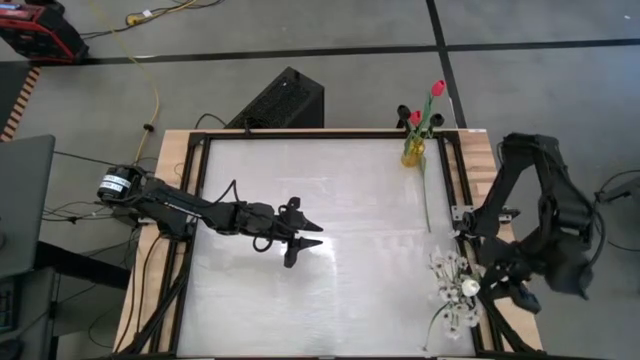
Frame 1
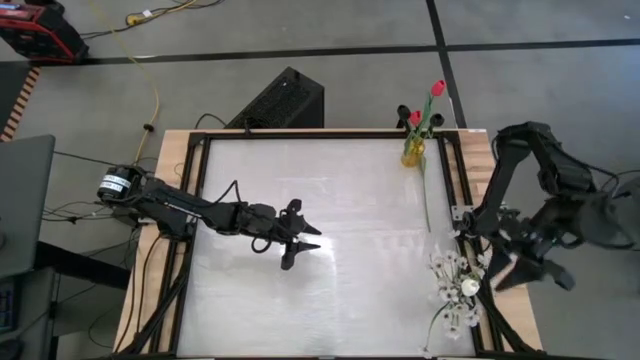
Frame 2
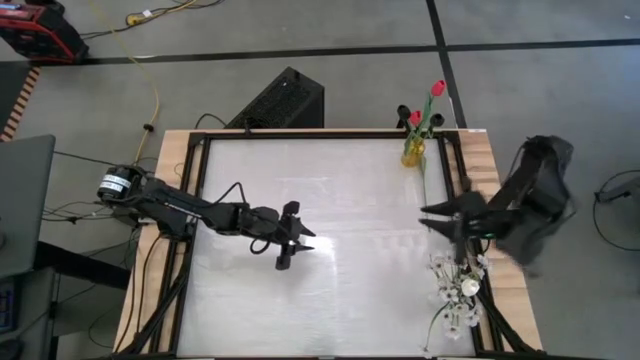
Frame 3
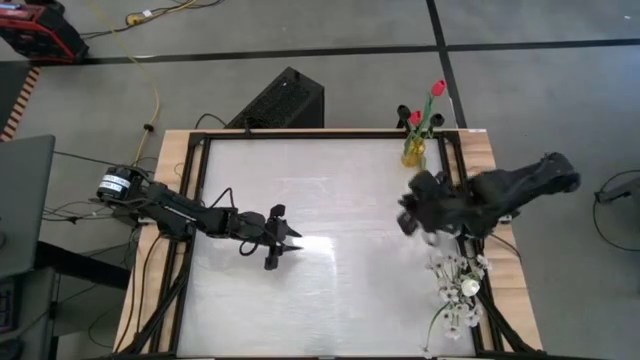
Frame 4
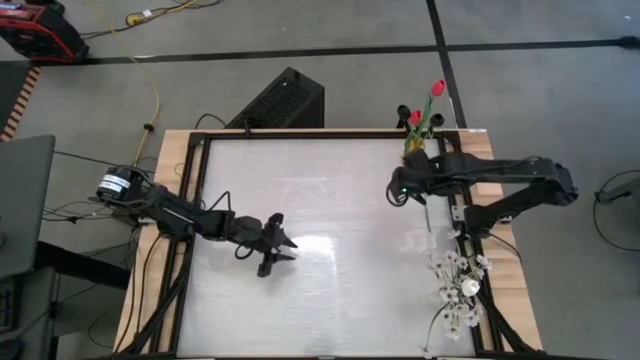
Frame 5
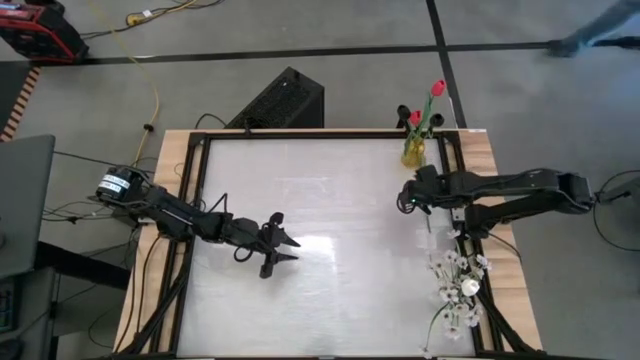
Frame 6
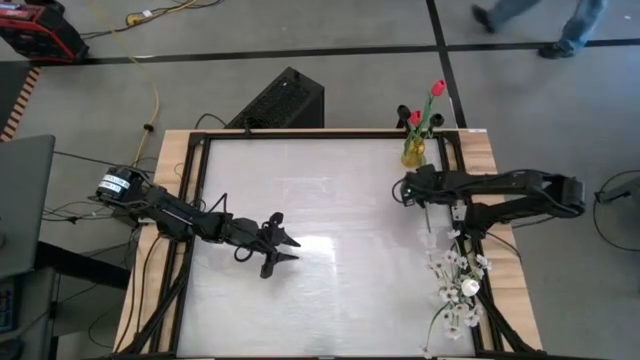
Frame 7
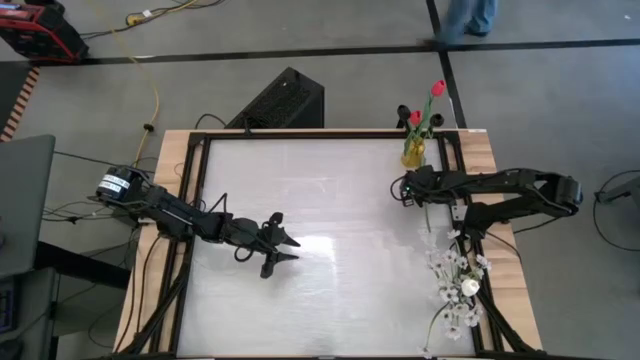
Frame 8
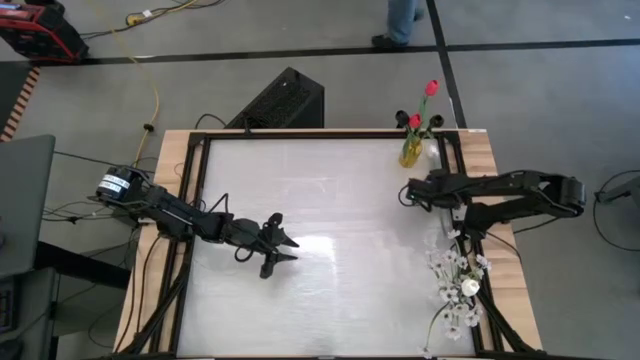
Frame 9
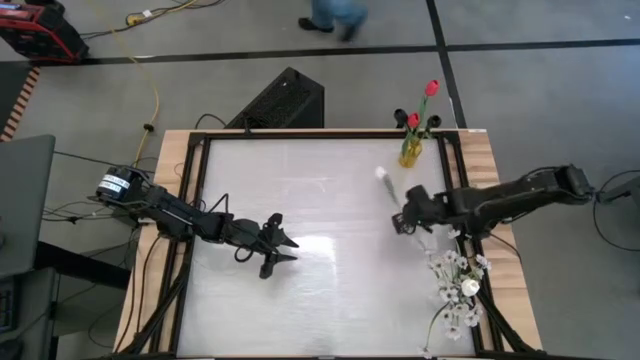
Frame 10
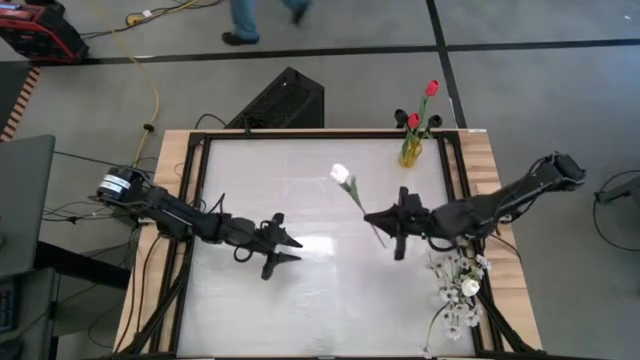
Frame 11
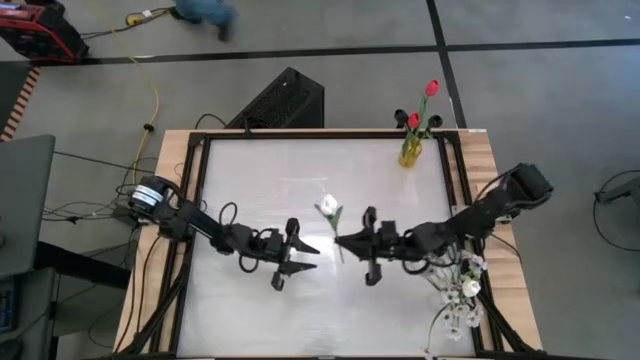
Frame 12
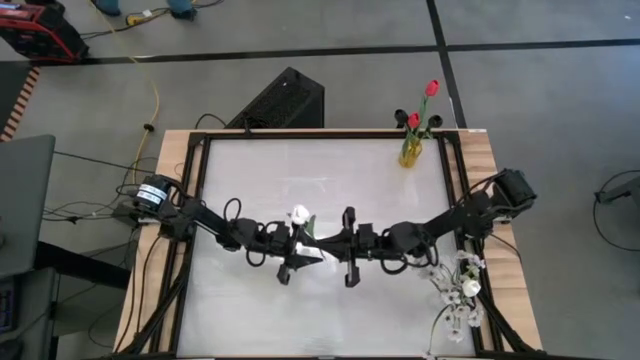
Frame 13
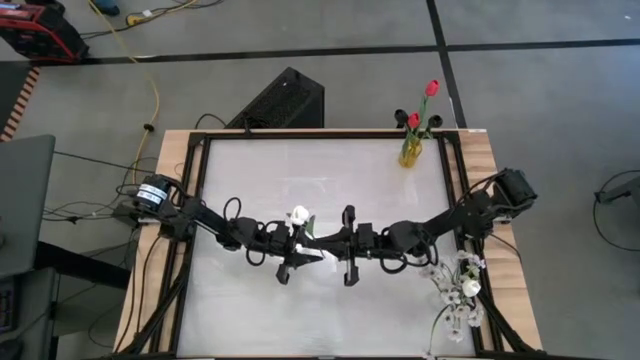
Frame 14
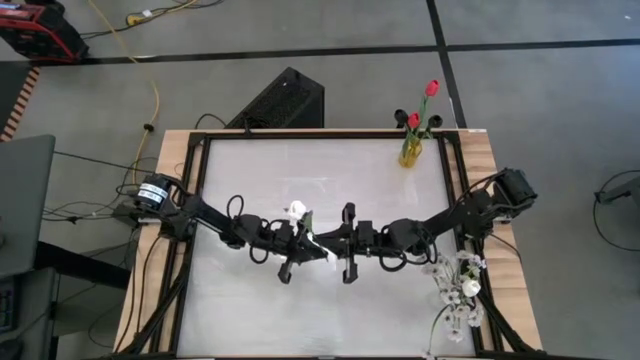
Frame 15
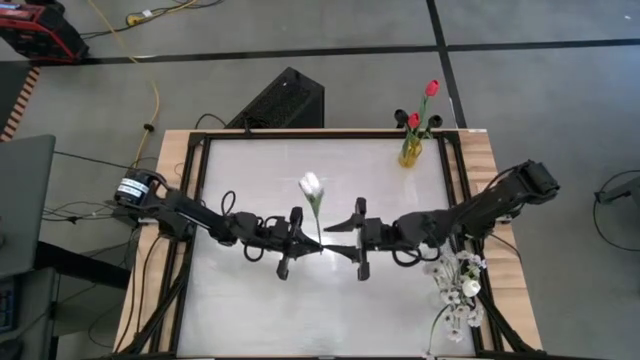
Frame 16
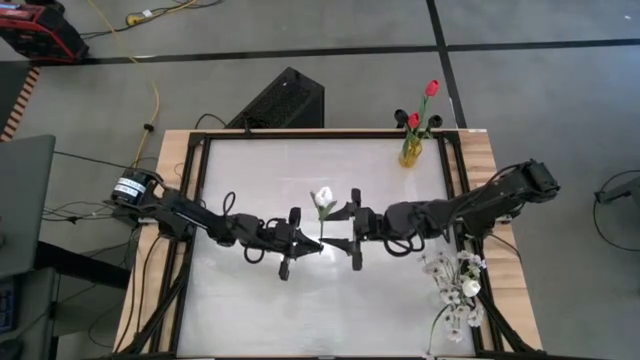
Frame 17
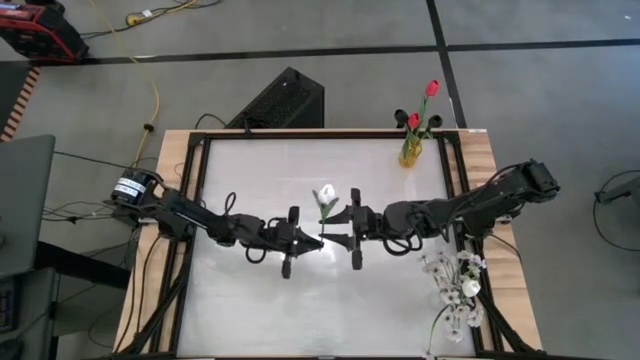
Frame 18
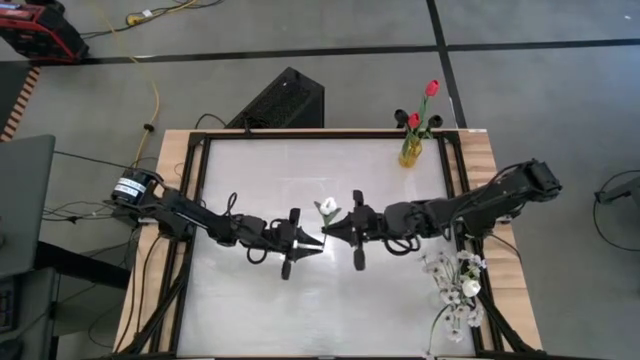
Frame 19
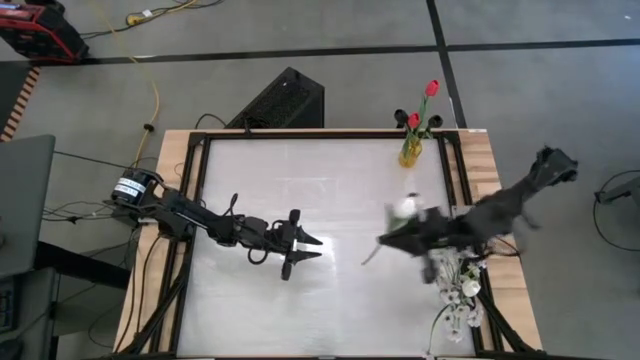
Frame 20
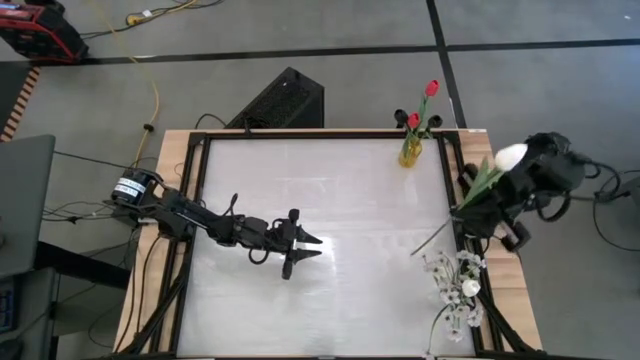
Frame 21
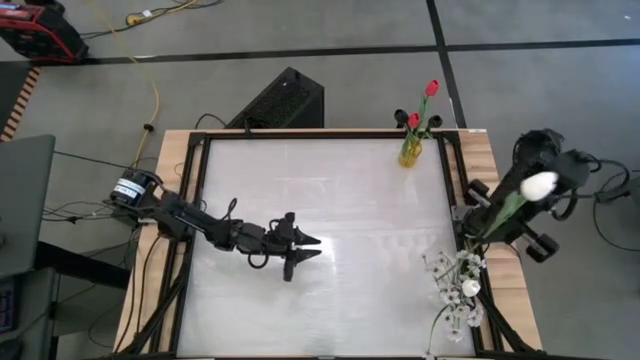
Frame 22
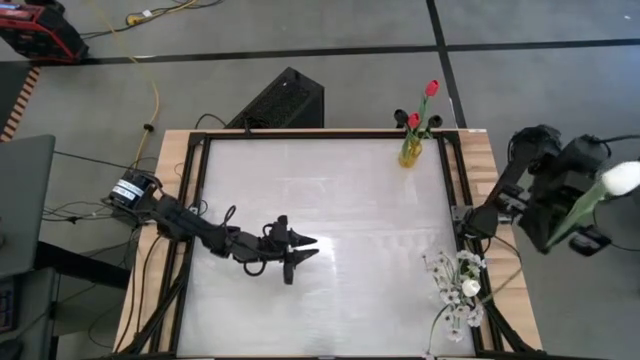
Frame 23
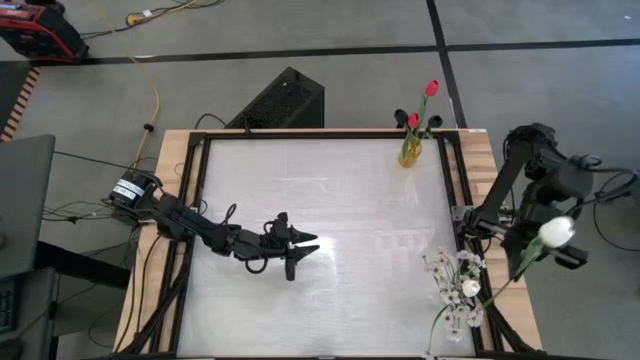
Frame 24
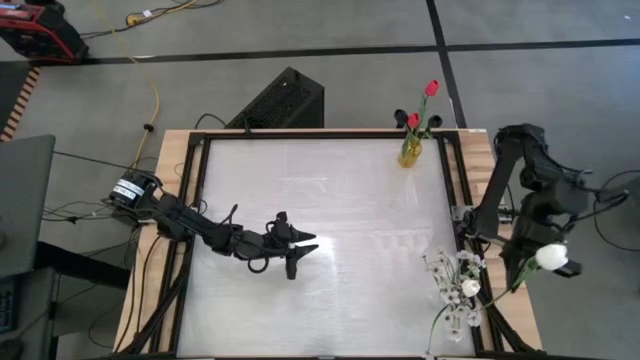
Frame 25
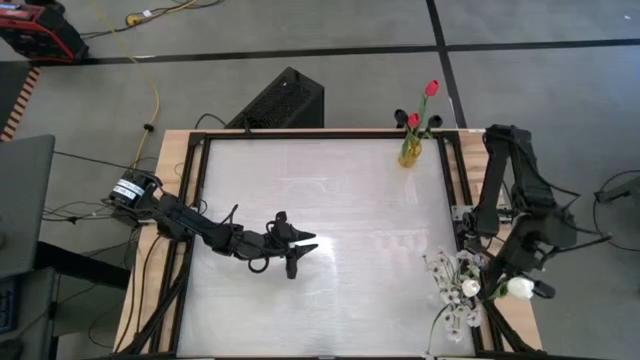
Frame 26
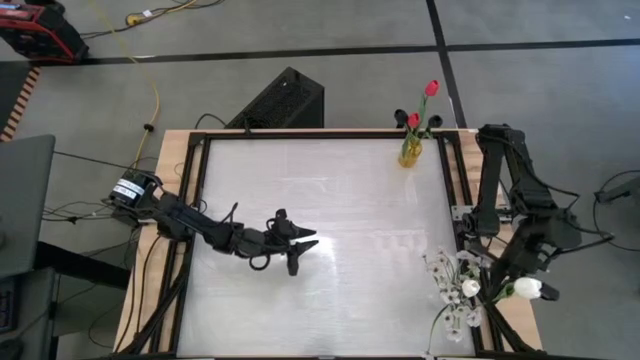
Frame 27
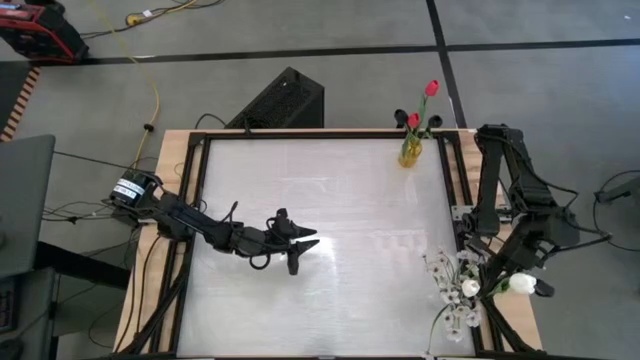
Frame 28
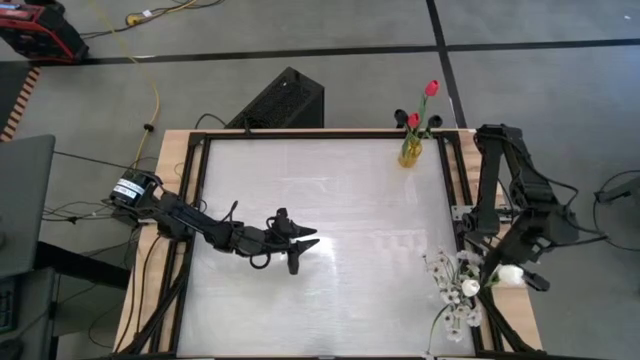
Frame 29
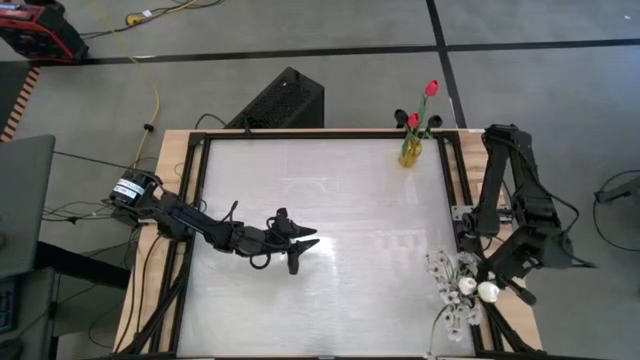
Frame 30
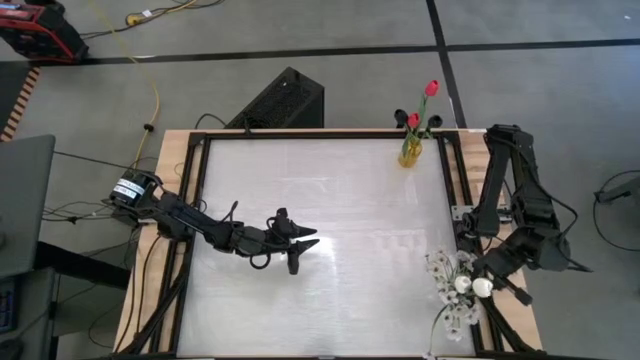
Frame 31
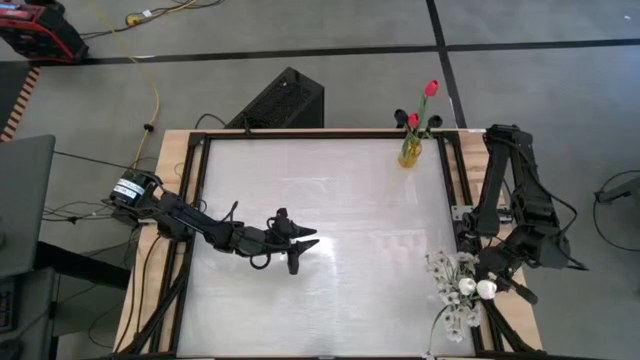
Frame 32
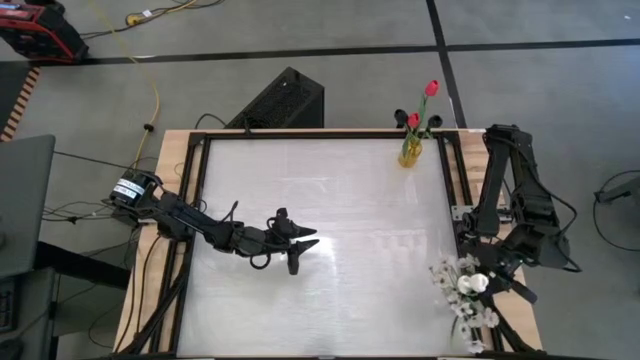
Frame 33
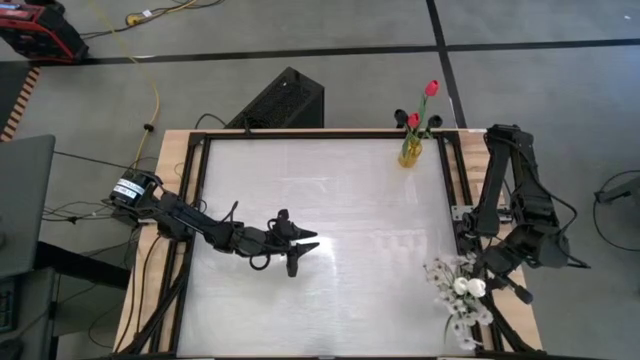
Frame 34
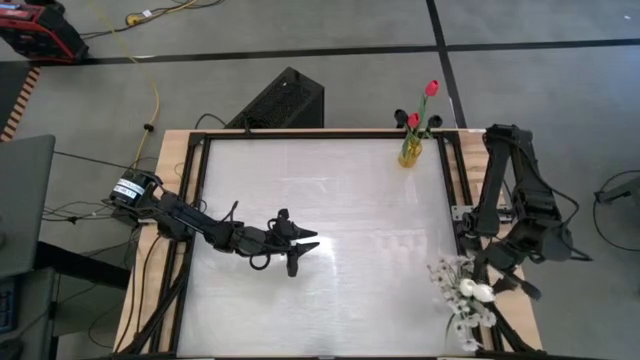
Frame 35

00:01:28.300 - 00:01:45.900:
Task: Sort flowers into vase by color
Put the white flower into the transparent flower vase

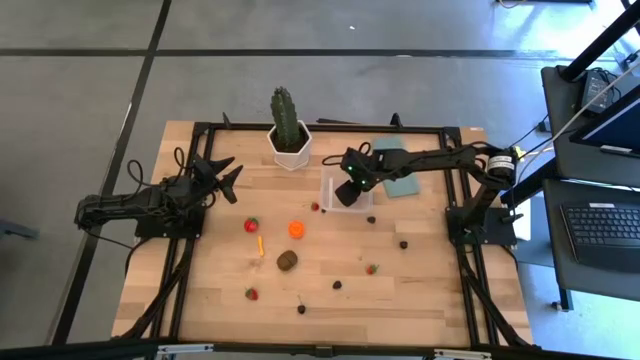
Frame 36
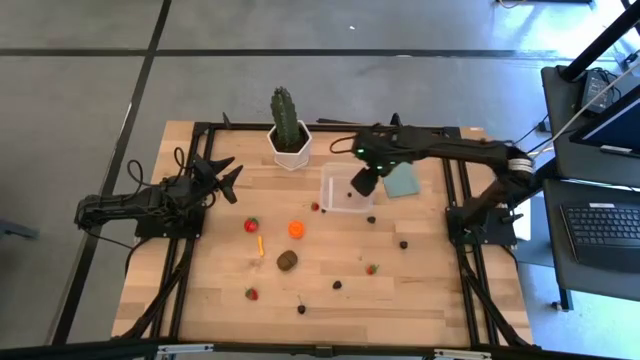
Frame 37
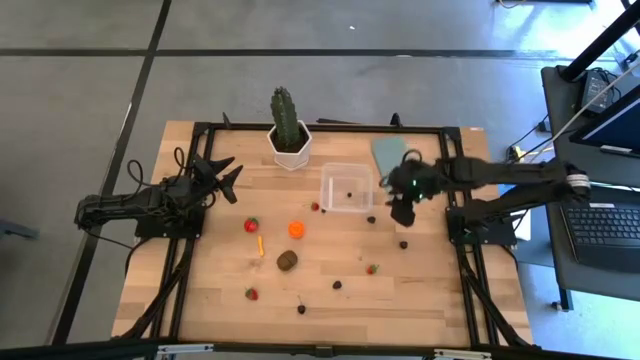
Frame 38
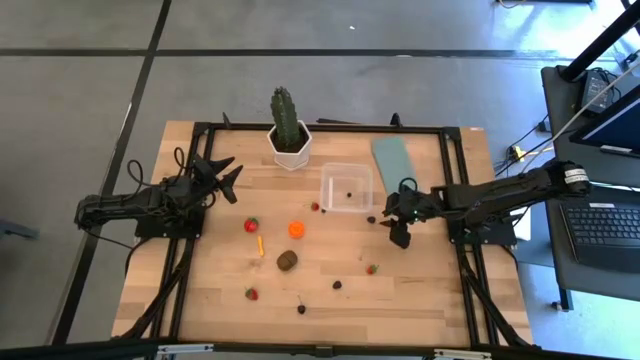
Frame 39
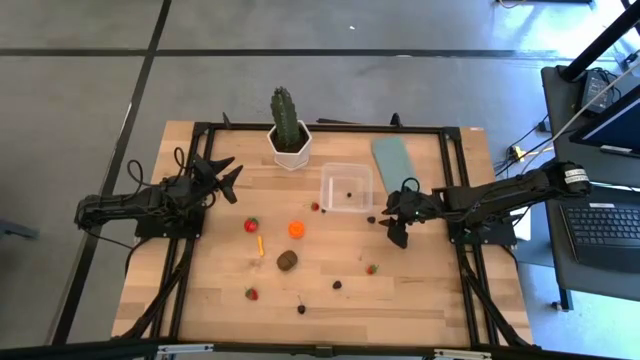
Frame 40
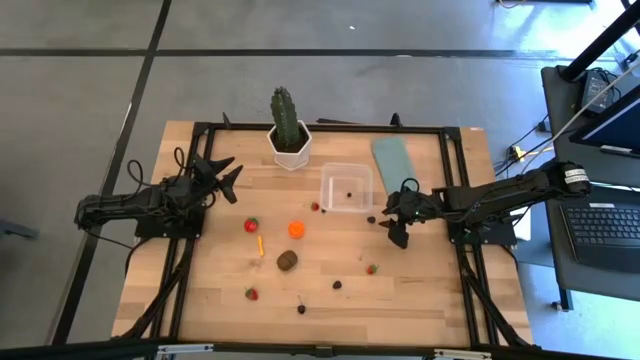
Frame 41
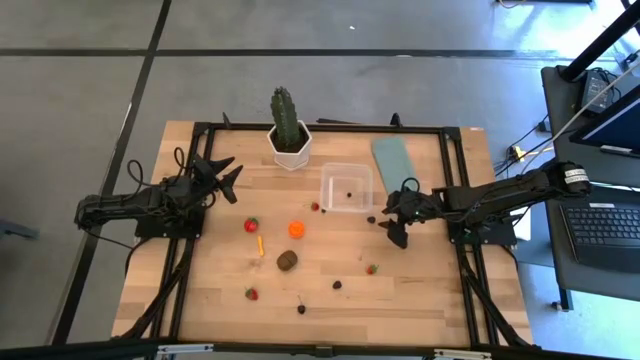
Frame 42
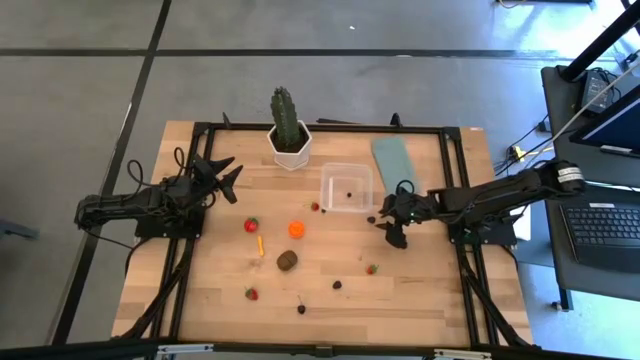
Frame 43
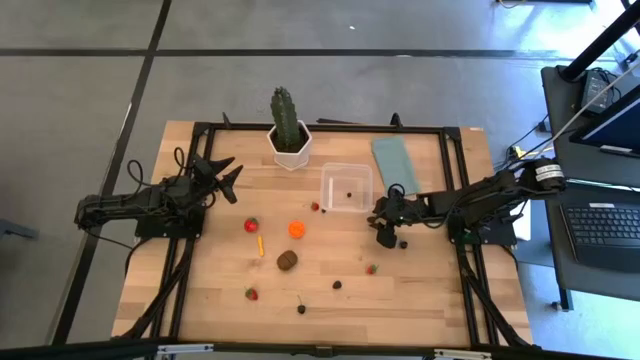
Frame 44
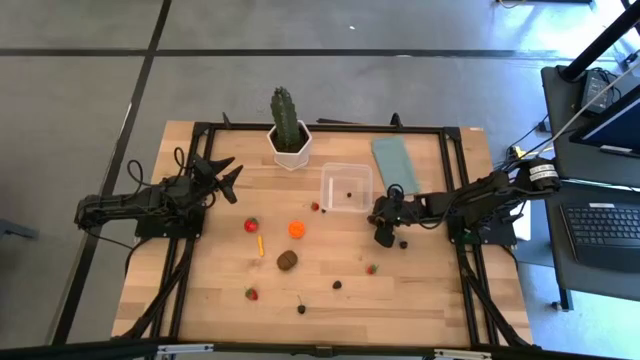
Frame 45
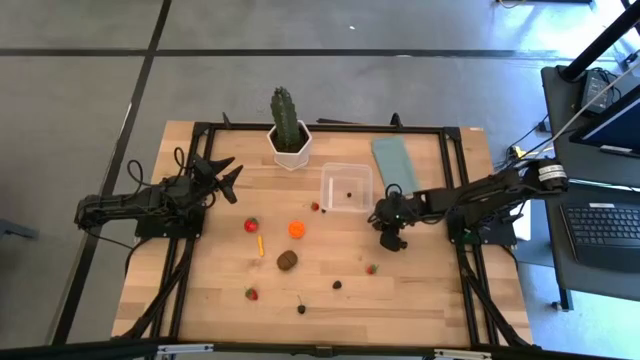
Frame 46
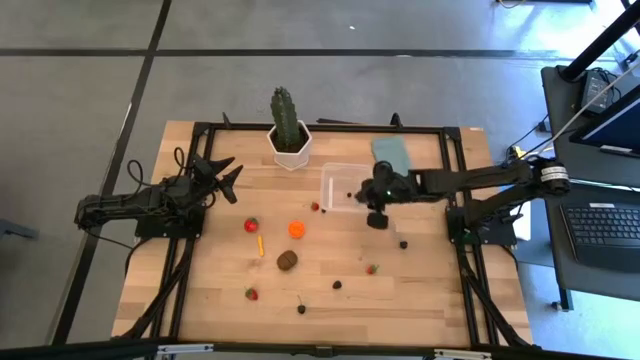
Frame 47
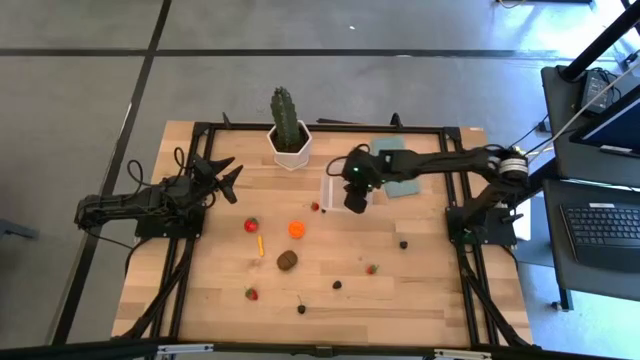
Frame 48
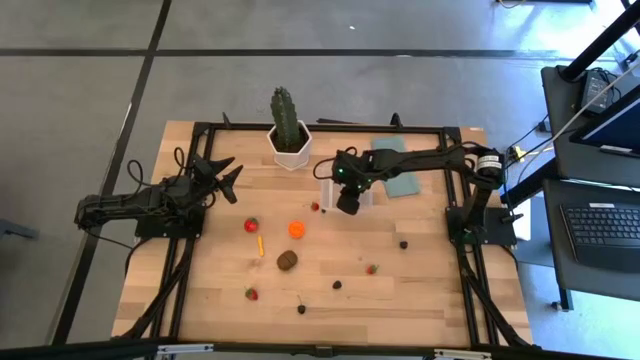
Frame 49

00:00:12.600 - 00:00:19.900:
Task: Pick and placing Produce into tupperware
Put the top raspberry into the transparent bin
